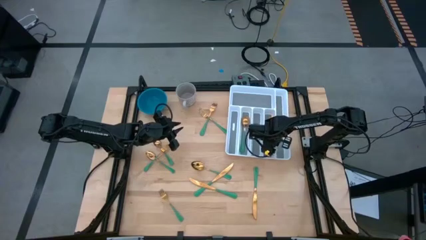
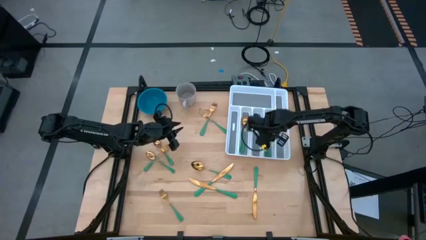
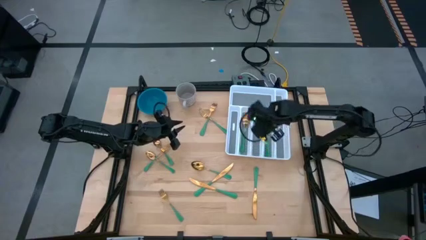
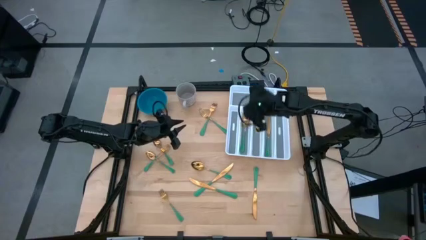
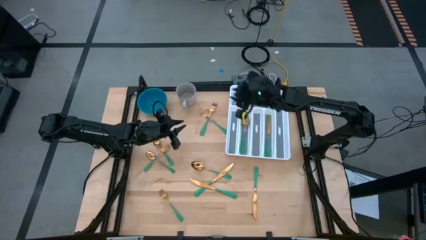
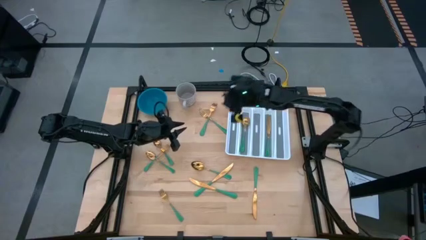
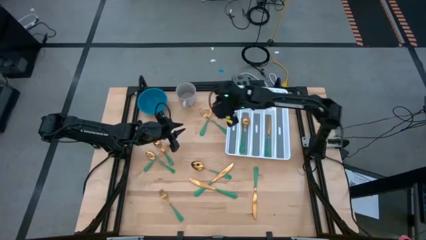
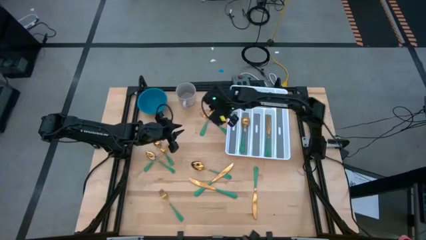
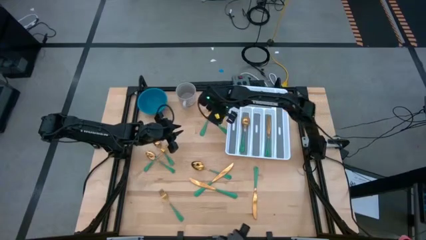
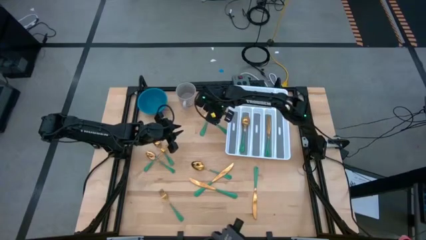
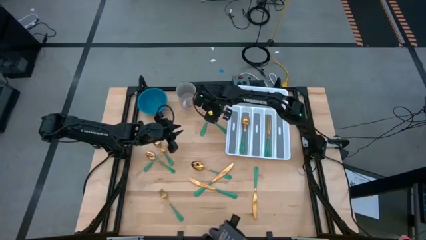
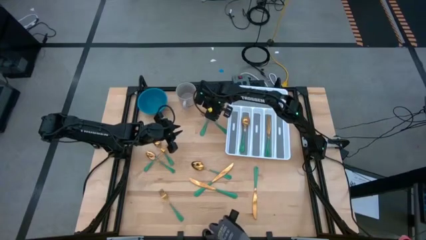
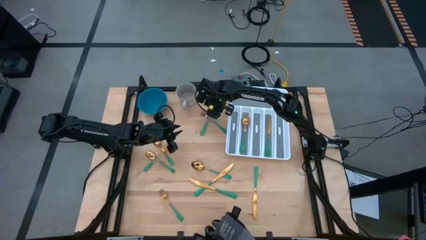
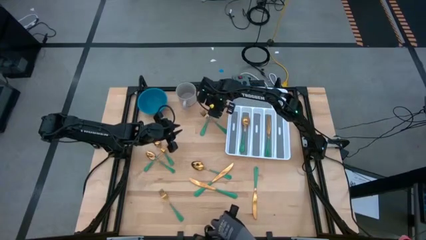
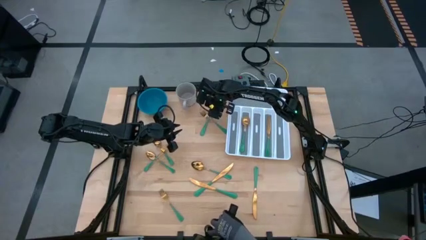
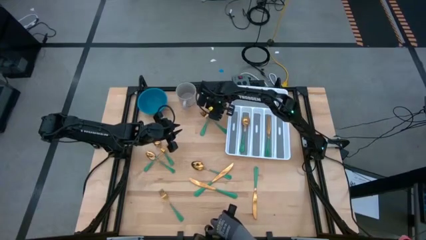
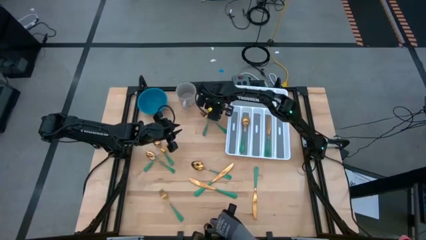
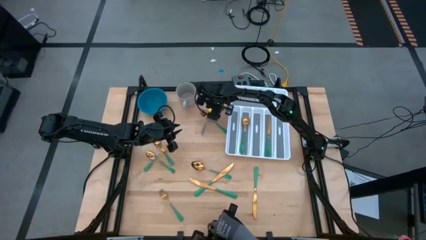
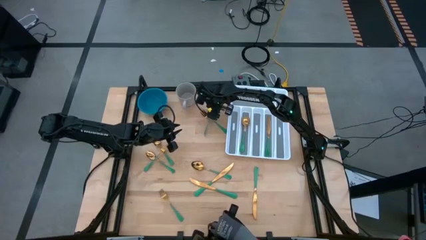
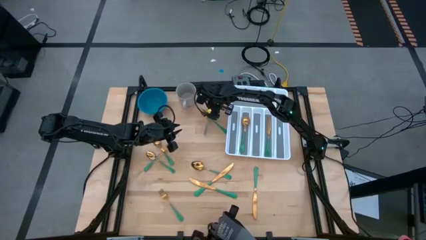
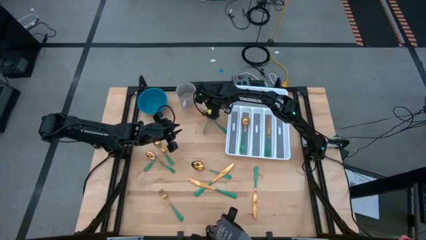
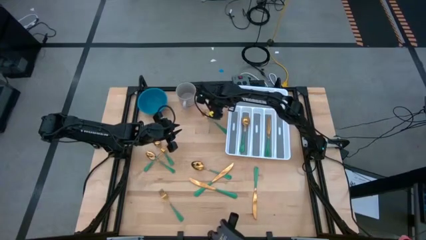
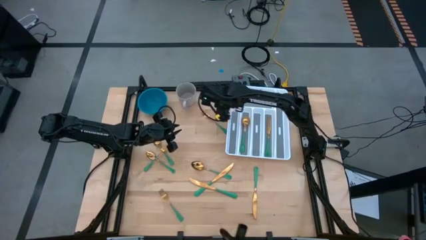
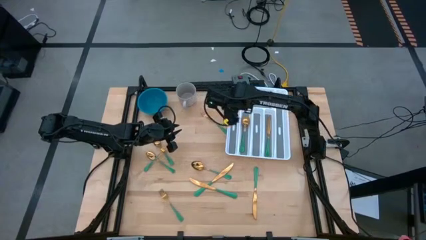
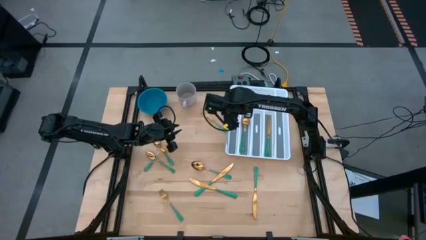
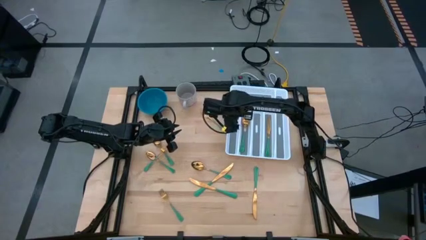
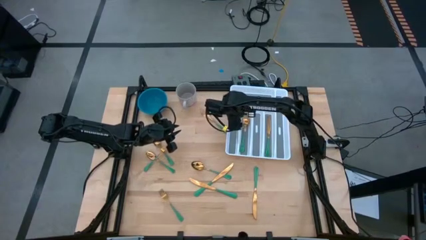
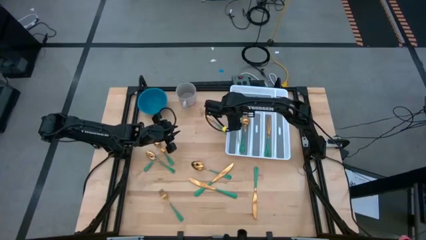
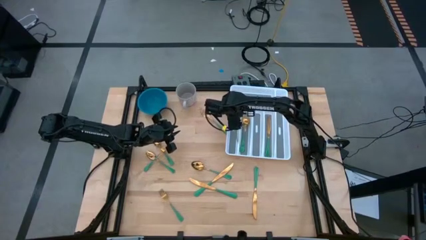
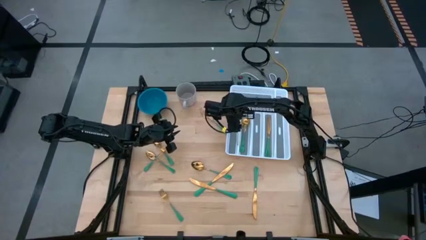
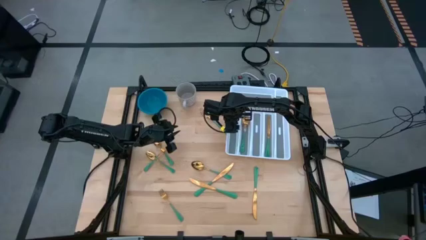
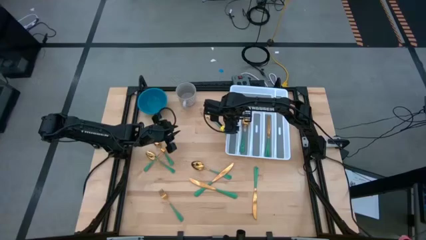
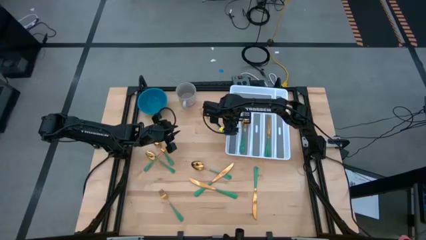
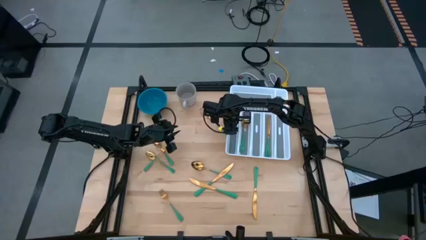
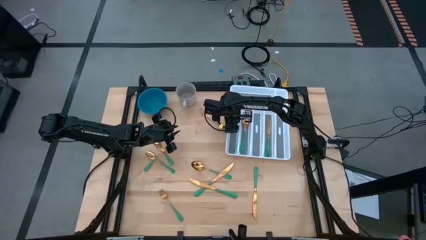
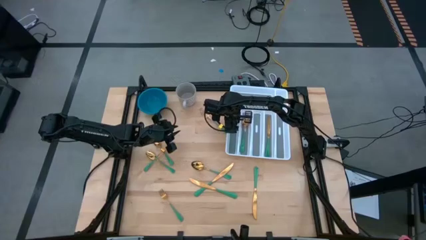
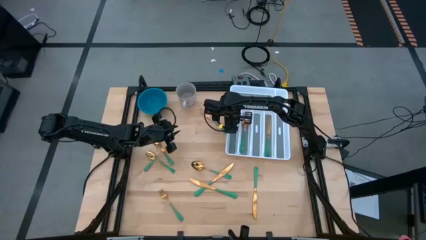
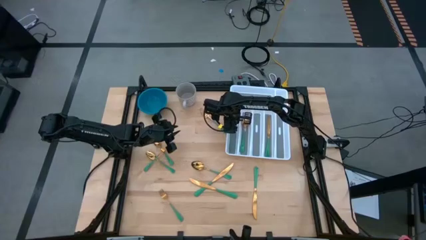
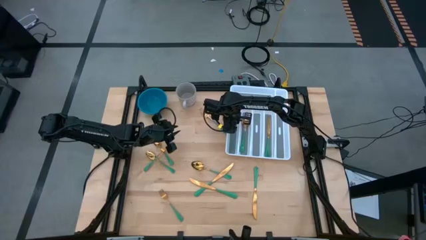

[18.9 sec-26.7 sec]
Task: Sort silverware
Put the green fork into the white silverware organizer

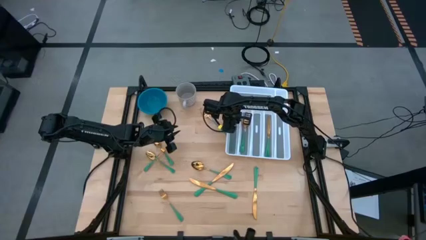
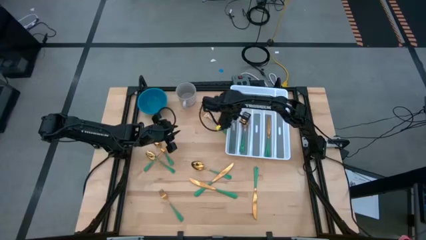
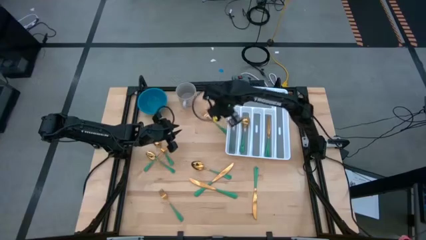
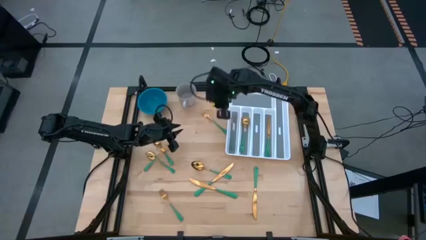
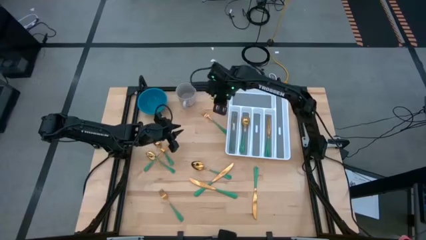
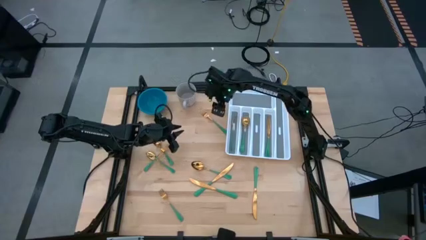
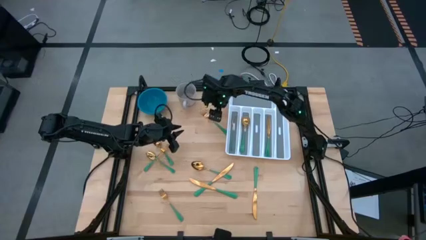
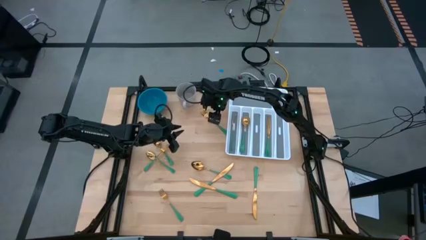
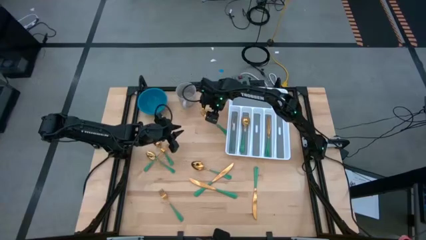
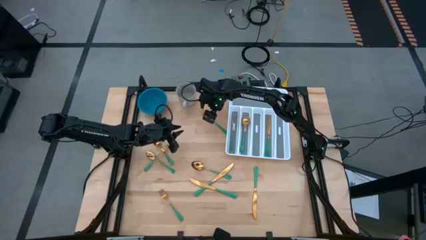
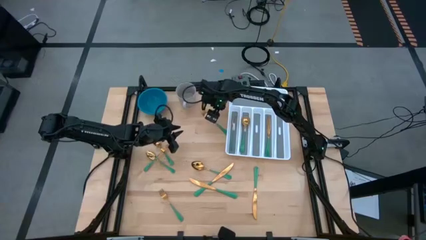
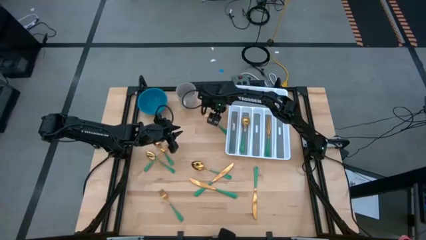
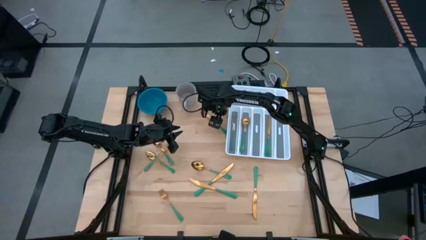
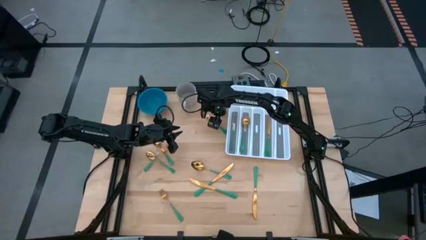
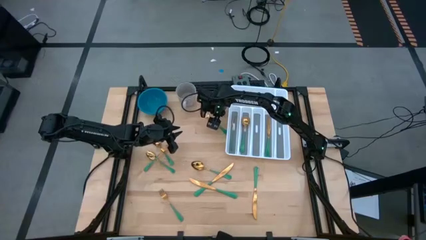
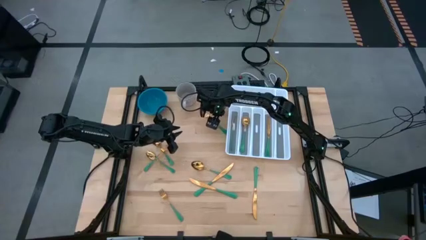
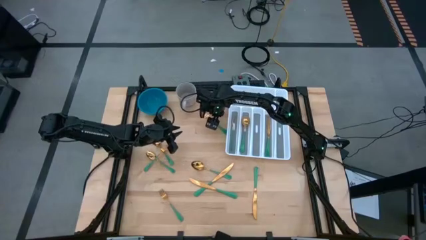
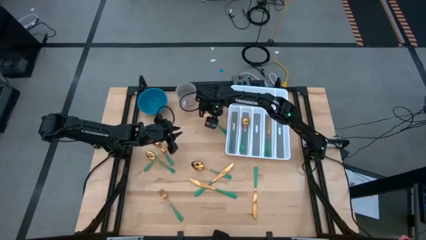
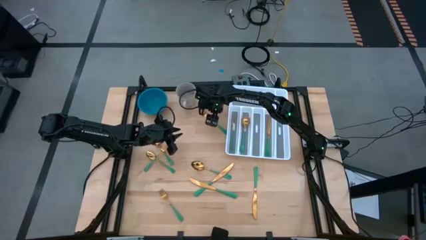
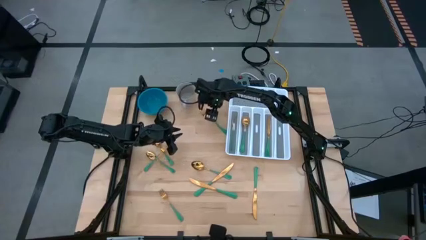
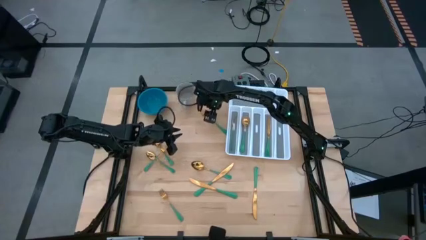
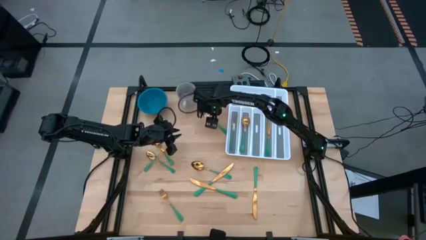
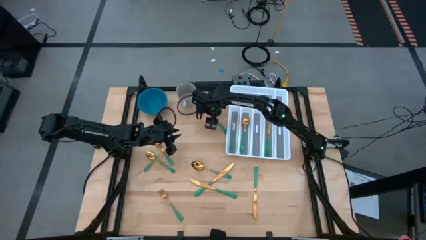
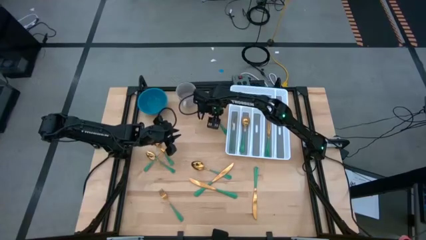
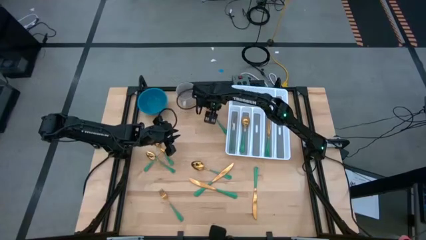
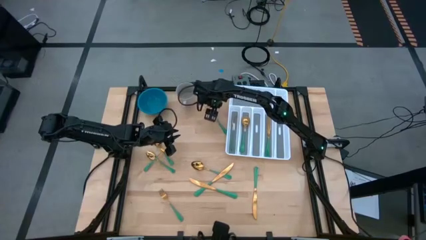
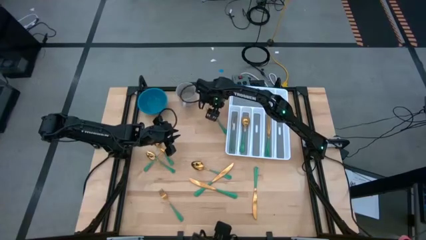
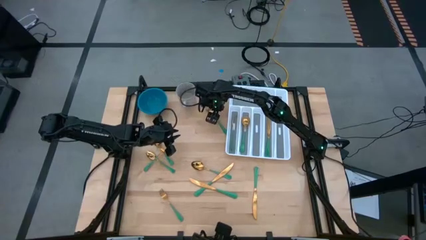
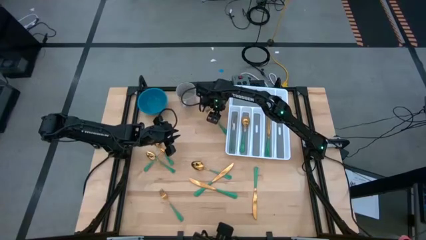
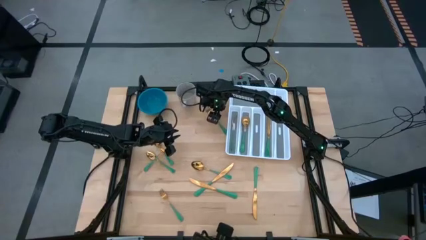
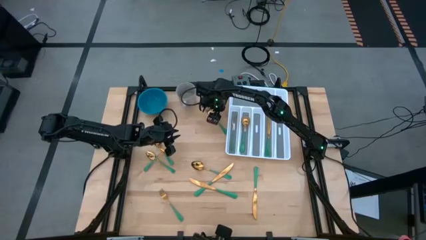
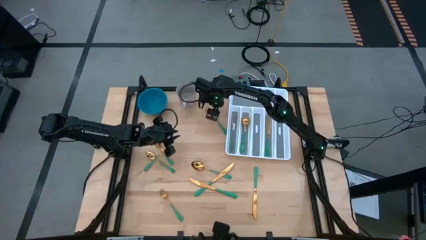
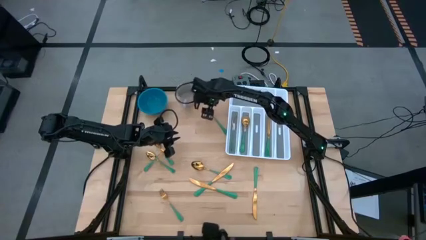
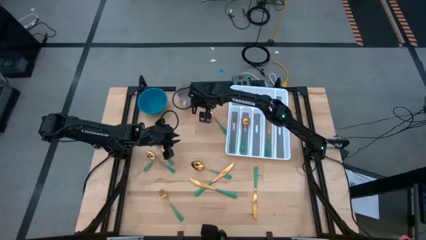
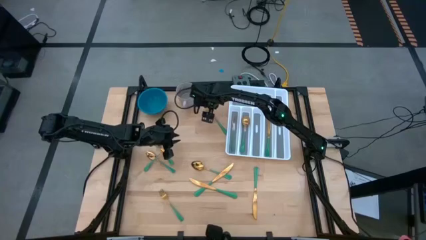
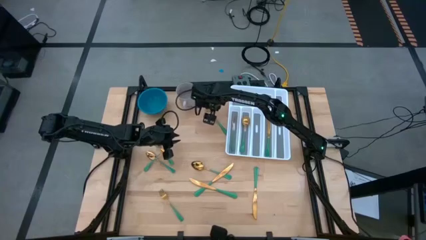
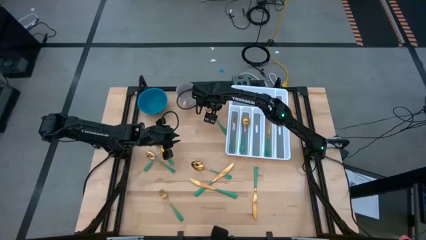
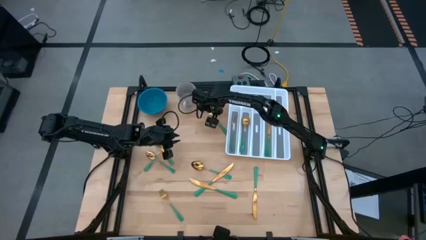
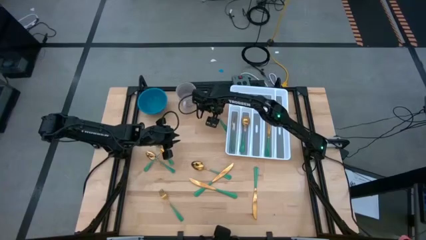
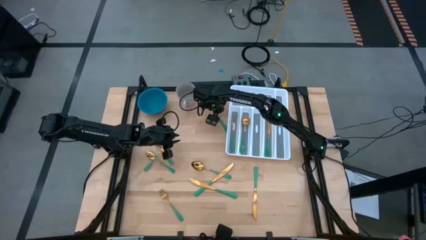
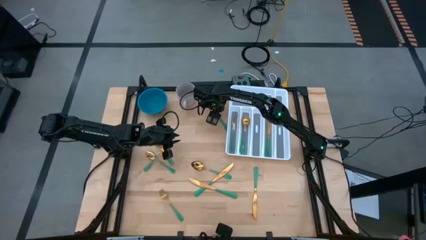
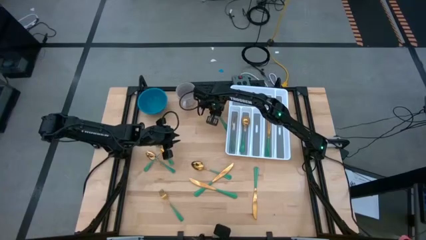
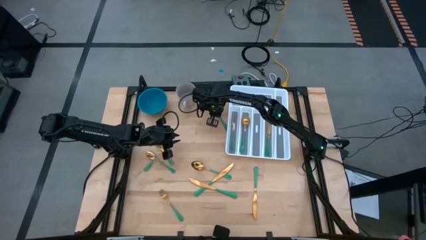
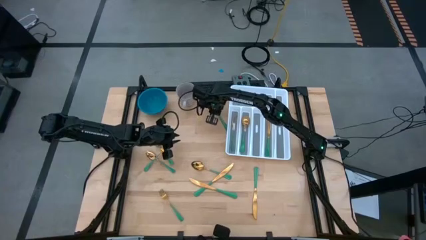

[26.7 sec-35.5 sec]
Put the green fork into the white silverware organizer
